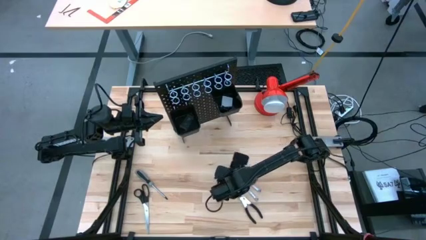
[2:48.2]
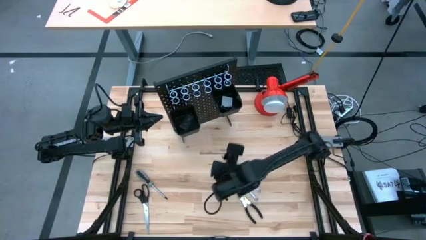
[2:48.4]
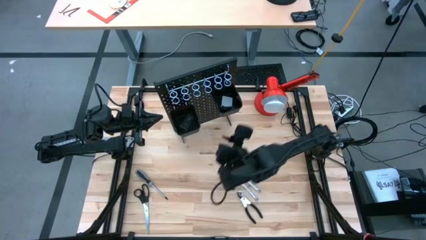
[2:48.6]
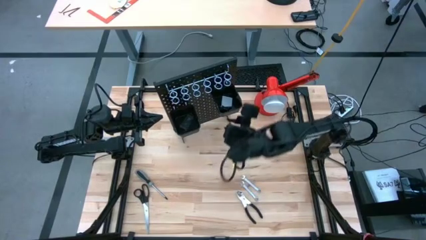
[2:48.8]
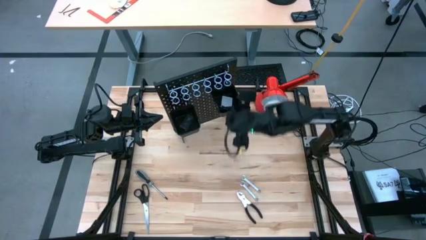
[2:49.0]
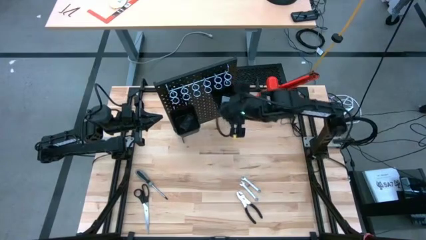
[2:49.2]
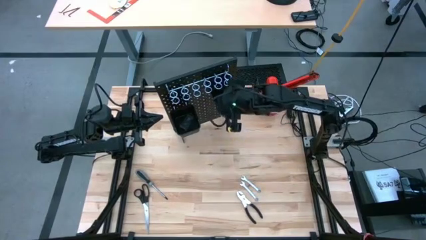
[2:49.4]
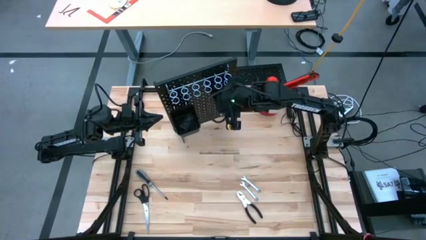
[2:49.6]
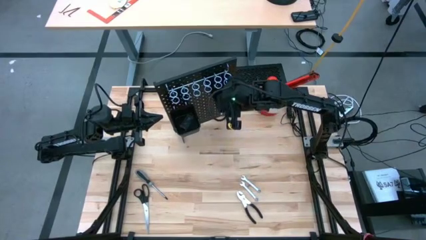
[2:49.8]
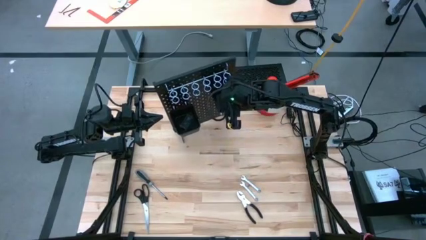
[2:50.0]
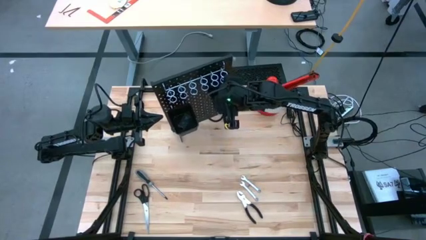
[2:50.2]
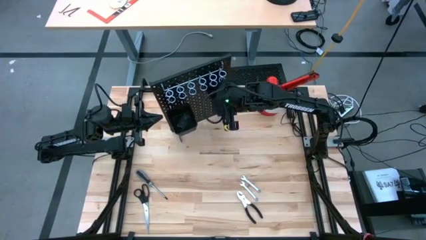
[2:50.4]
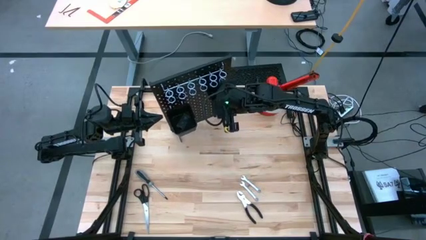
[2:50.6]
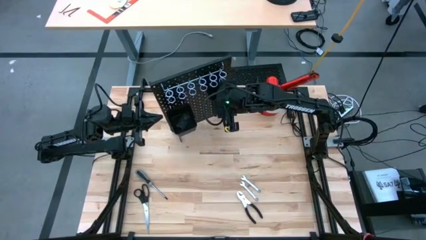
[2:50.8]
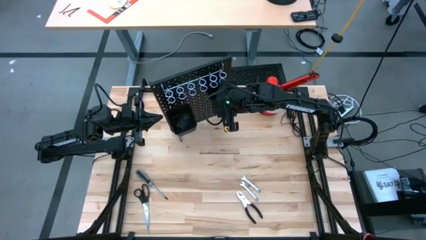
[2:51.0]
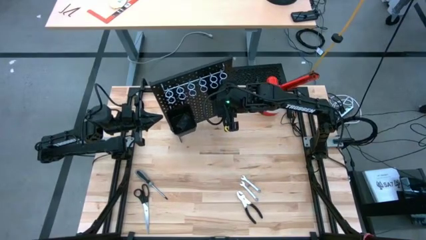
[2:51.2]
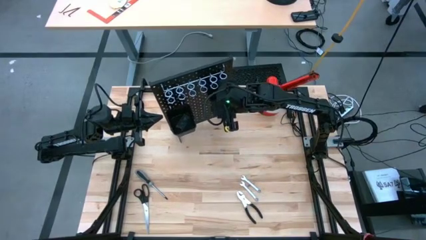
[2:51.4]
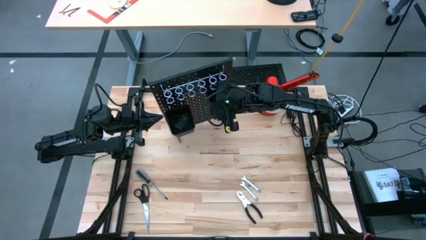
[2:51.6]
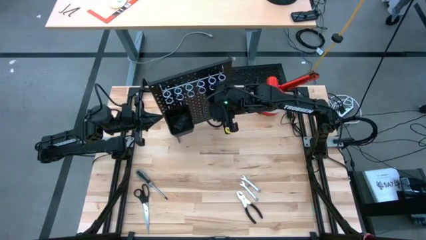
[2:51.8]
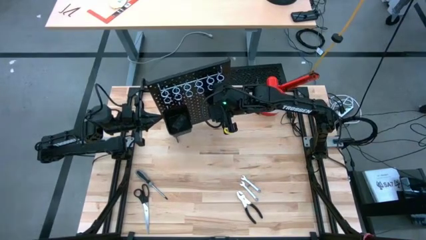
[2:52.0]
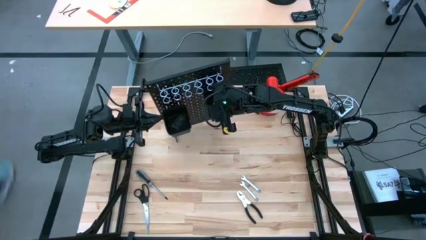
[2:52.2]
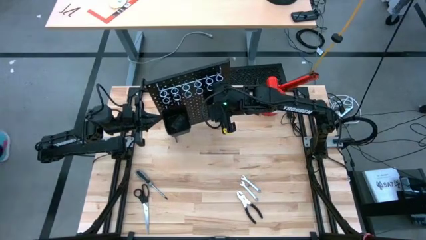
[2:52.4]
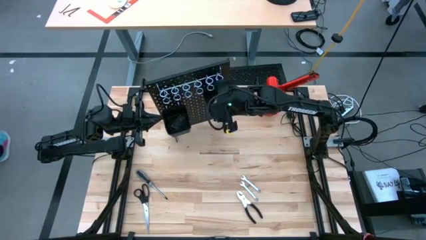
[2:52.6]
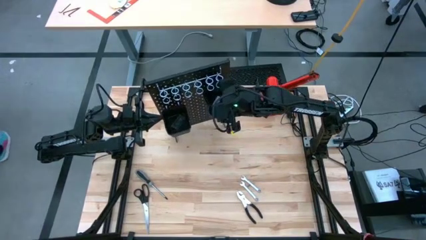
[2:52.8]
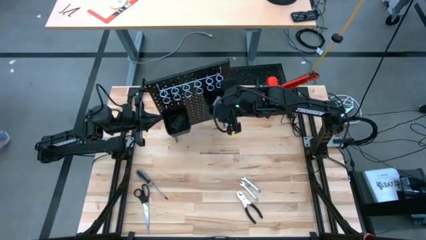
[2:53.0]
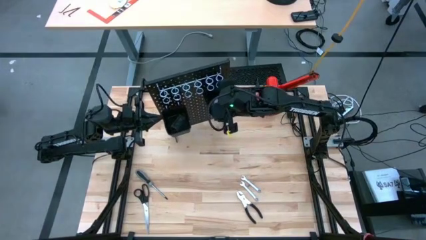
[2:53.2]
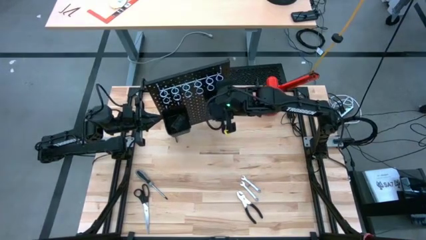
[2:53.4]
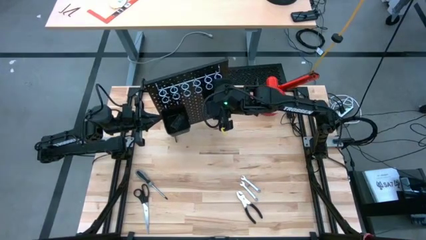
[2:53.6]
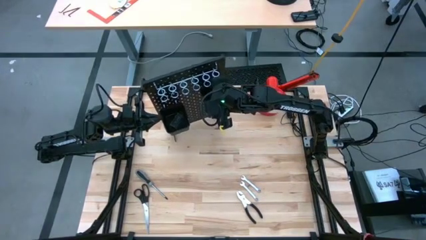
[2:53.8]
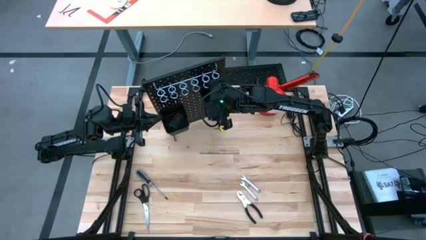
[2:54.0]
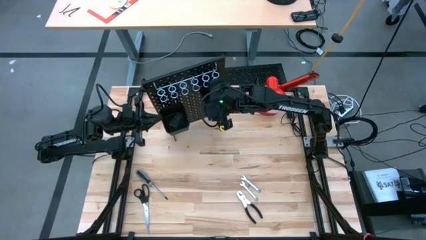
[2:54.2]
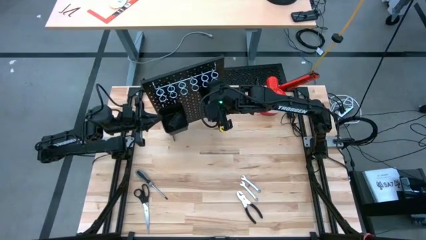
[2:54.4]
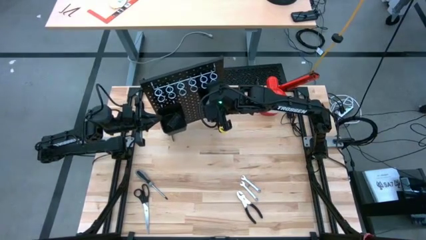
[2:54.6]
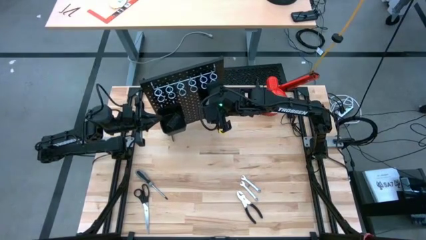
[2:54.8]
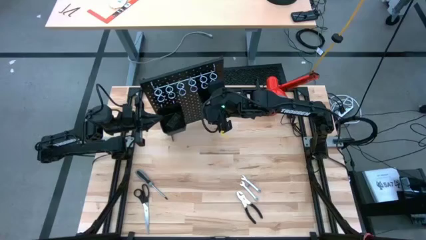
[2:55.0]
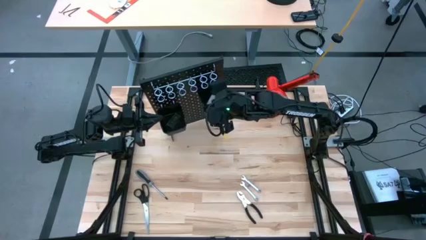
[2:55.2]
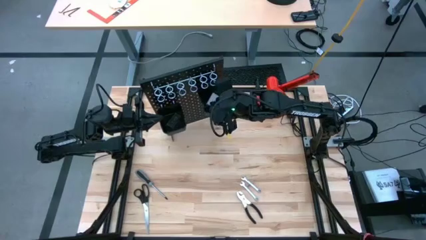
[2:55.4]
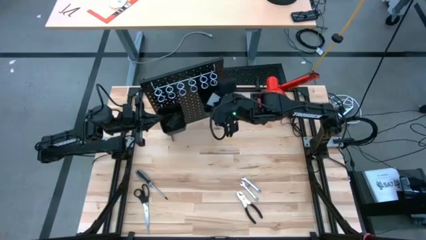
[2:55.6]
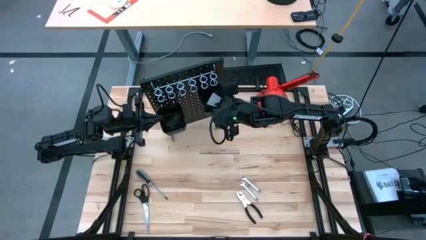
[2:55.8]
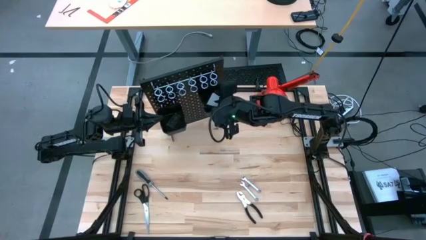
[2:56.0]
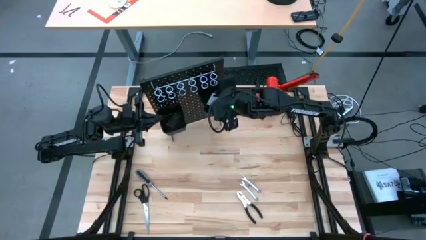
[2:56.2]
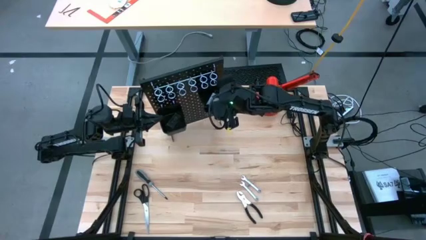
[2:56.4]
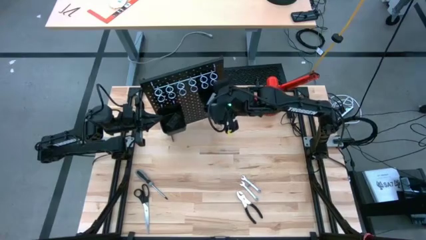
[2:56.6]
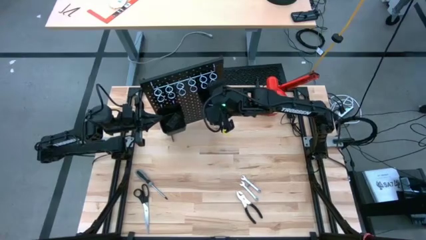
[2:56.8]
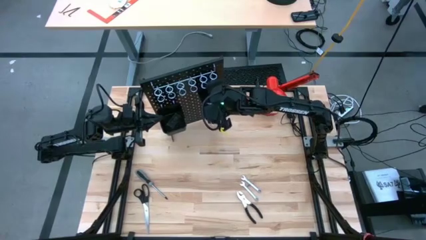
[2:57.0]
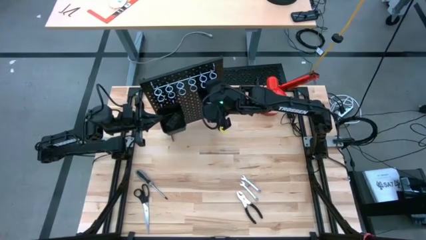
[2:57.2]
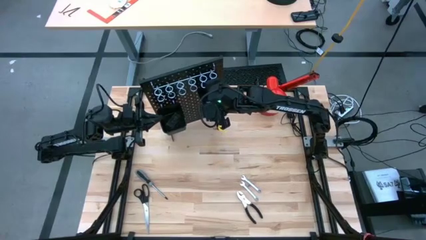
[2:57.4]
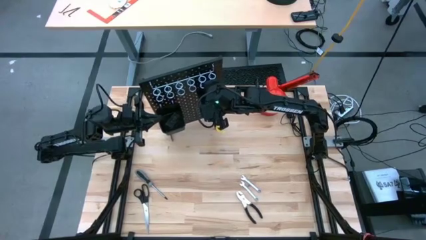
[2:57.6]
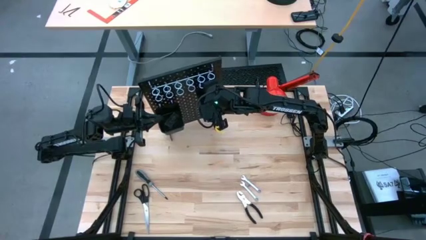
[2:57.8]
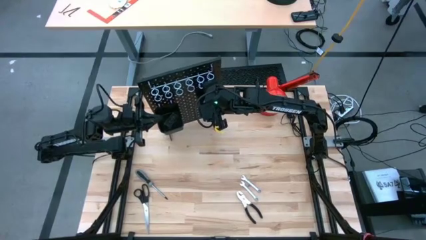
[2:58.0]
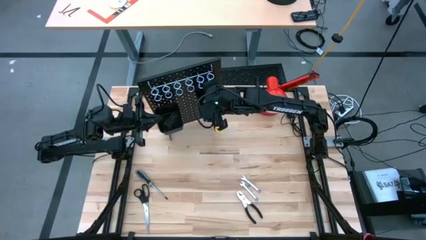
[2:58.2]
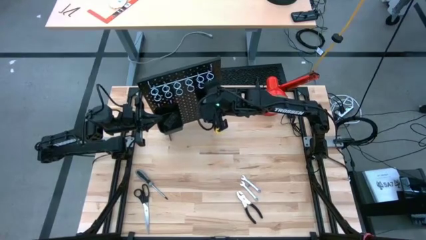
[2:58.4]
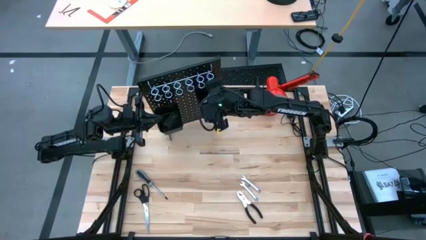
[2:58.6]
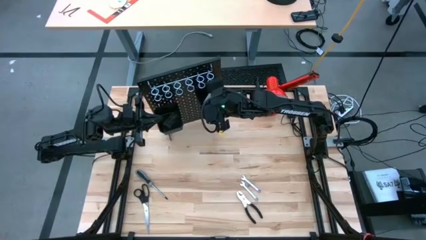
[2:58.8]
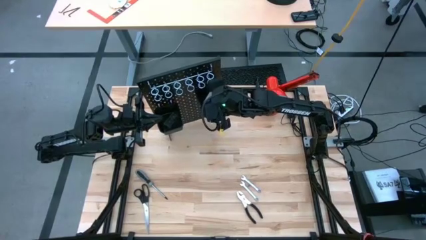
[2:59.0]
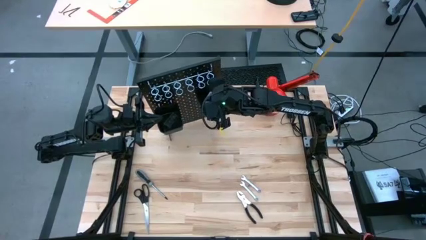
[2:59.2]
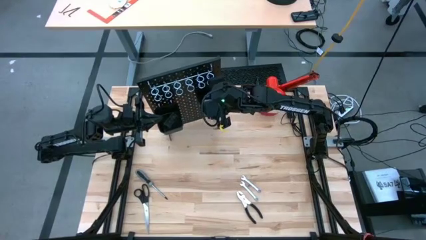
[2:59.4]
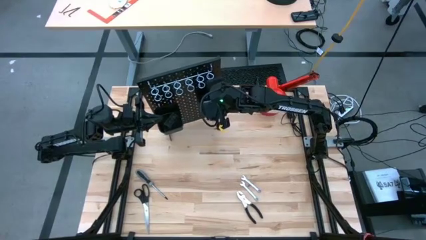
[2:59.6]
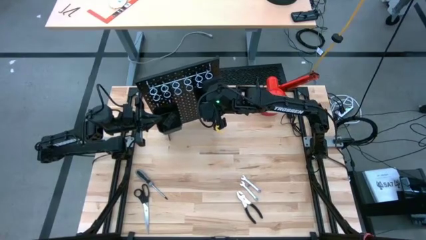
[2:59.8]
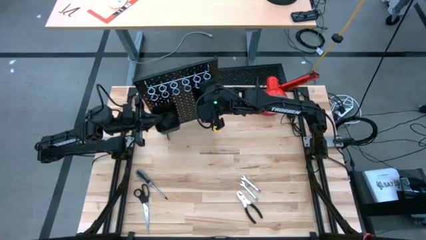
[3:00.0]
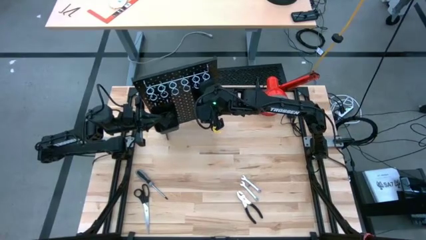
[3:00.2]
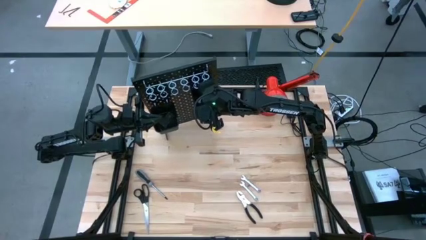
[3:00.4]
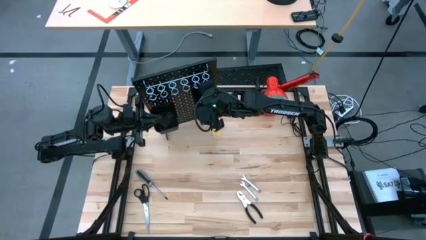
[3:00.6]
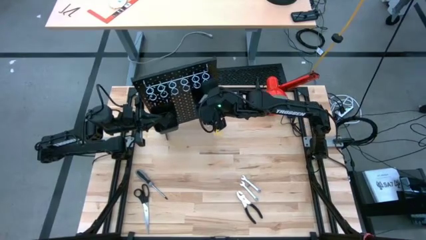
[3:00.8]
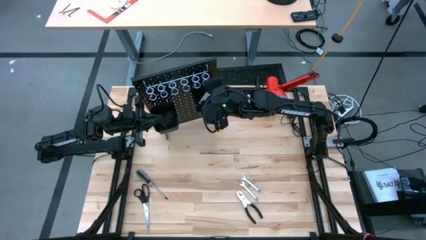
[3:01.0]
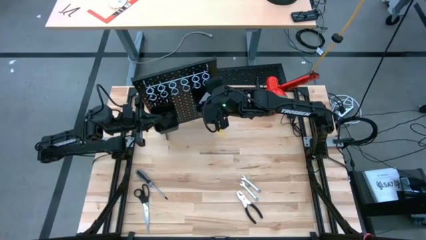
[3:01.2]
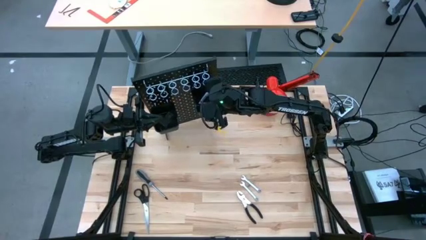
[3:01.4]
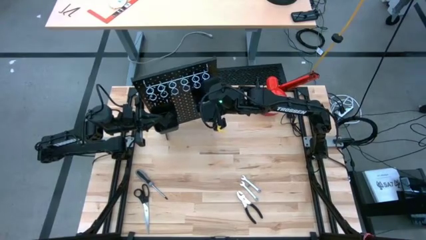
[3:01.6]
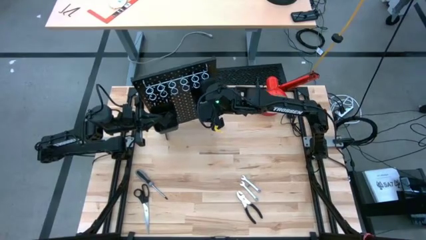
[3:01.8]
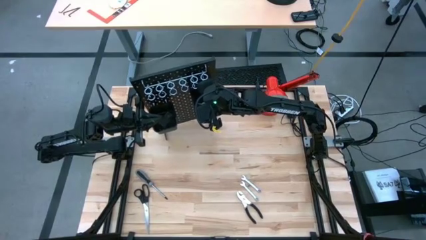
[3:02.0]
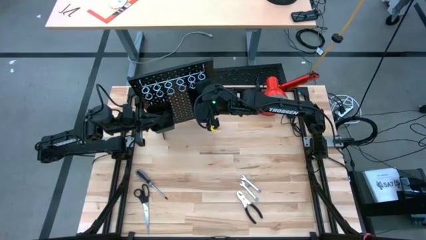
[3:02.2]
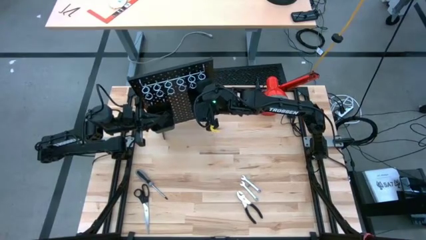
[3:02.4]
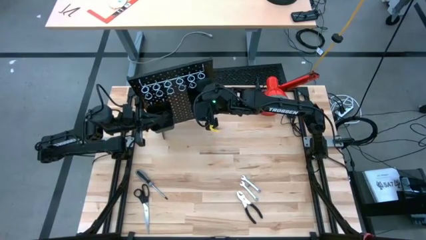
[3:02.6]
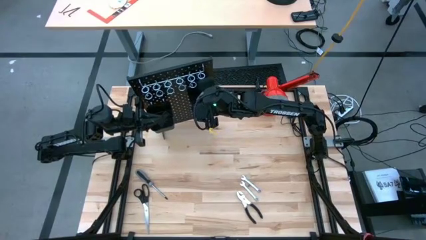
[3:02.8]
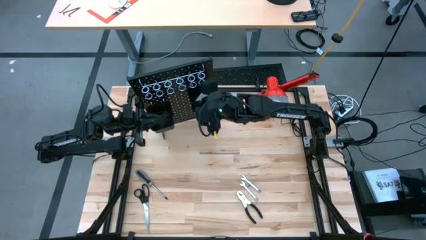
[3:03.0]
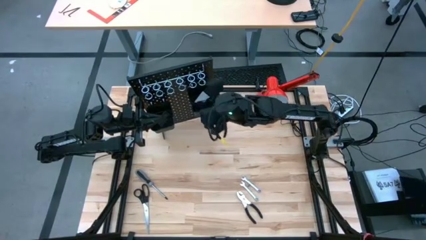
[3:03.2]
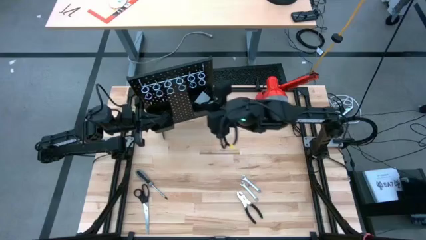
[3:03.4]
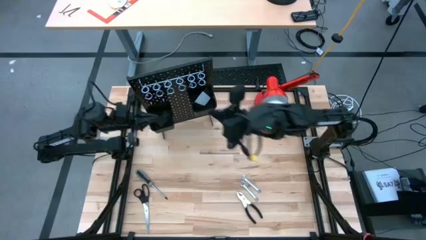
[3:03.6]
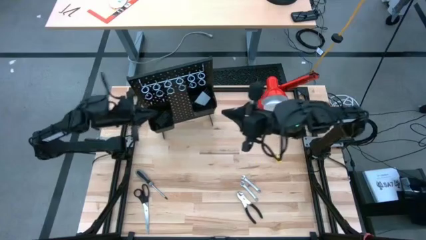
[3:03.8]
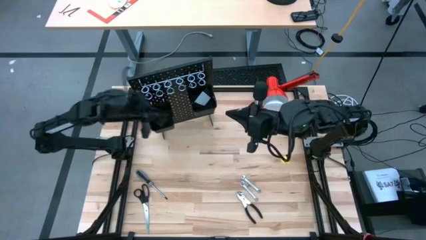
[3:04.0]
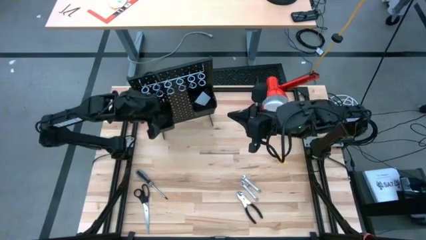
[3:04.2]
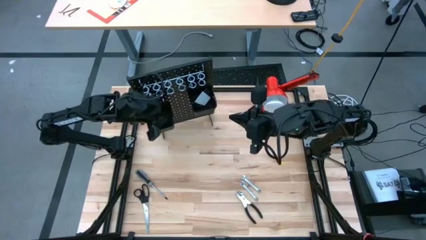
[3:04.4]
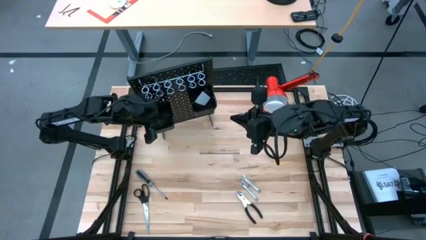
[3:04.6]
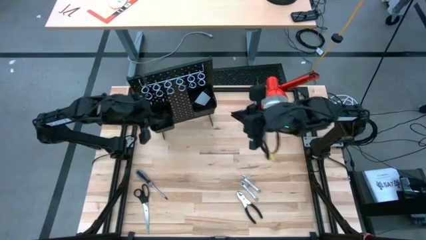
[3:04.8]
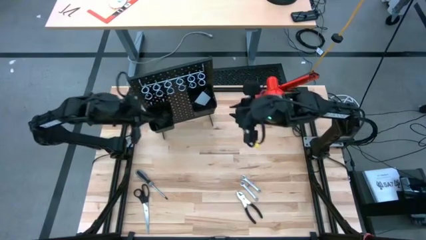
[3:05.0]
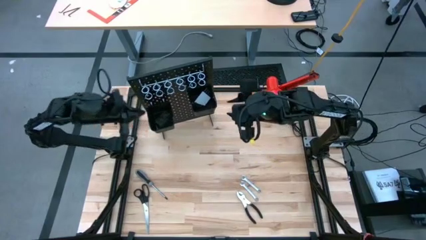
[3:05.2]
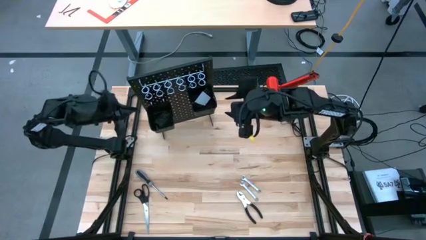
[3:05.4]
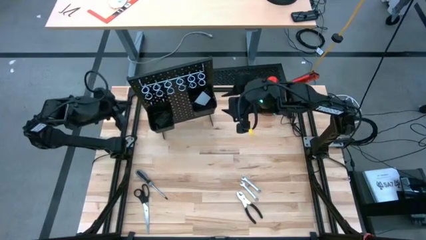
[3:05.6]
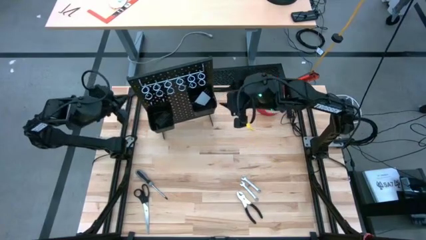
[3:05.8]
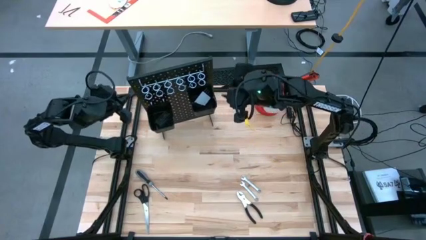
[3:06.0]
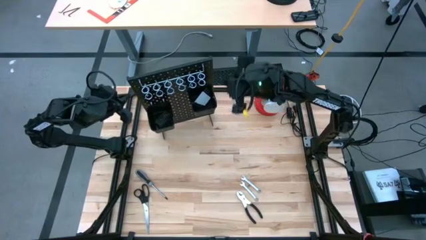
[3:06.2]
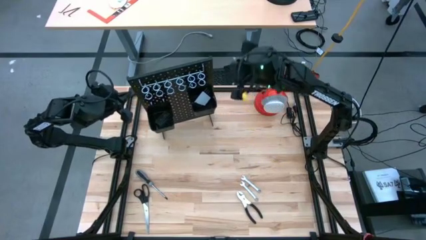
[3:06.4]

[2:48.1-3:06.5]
Task: Hang tools onto peg board
Remove the black allen wrench set from the top black basket on the pegboard to the table
